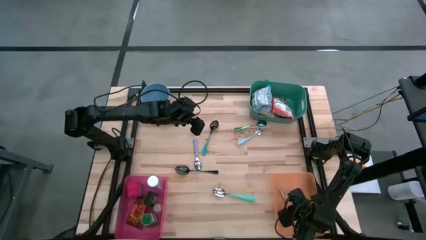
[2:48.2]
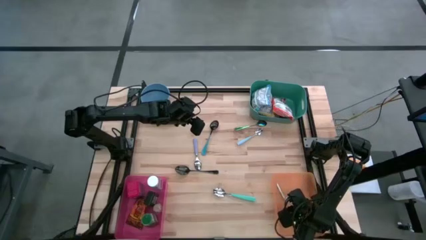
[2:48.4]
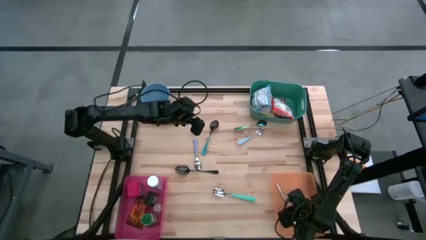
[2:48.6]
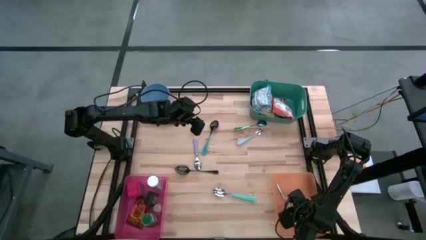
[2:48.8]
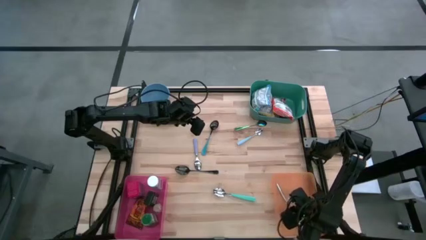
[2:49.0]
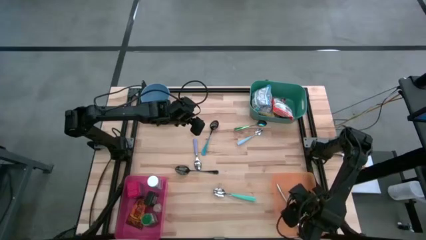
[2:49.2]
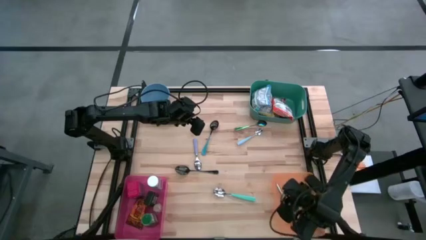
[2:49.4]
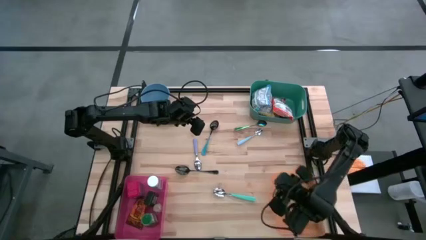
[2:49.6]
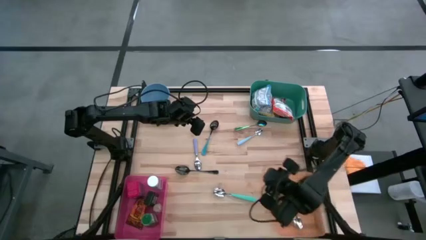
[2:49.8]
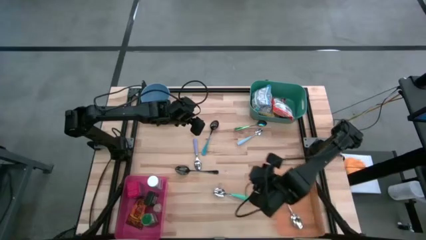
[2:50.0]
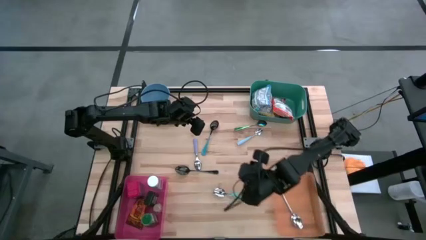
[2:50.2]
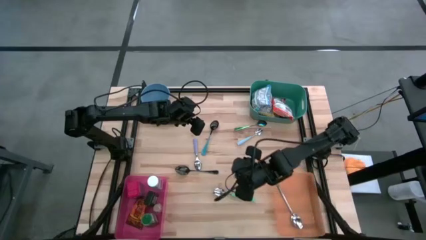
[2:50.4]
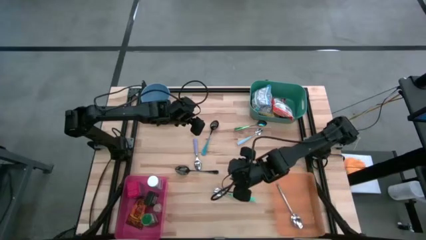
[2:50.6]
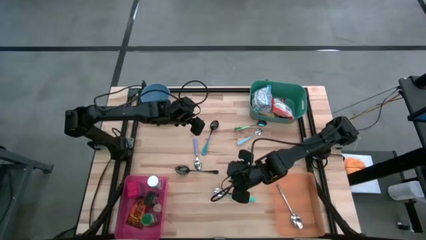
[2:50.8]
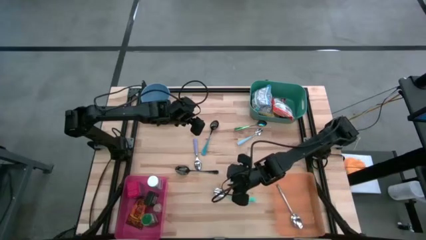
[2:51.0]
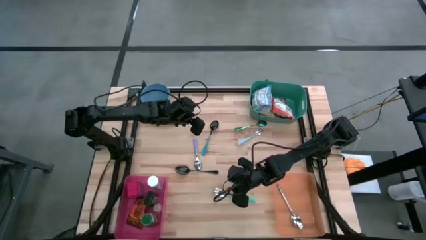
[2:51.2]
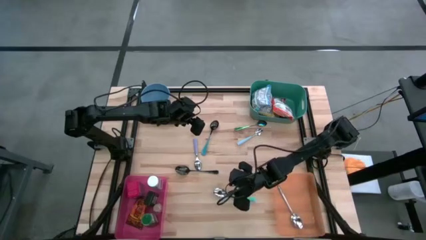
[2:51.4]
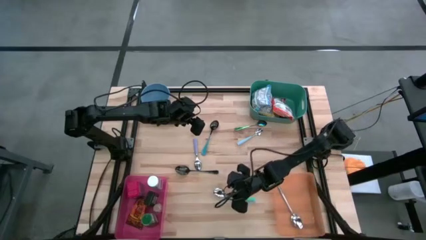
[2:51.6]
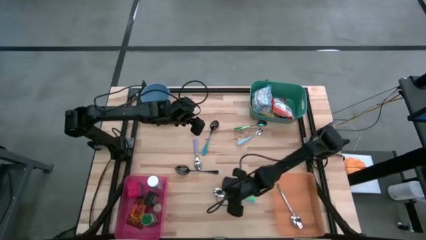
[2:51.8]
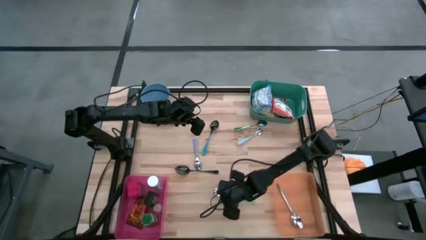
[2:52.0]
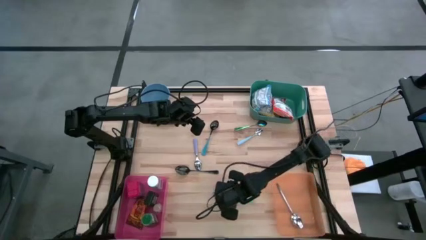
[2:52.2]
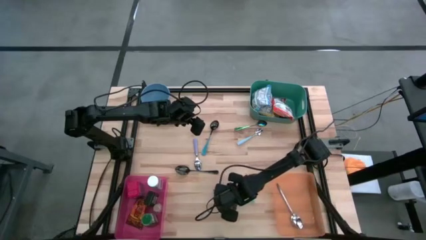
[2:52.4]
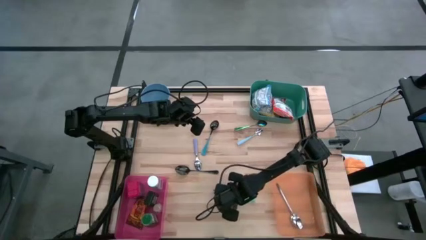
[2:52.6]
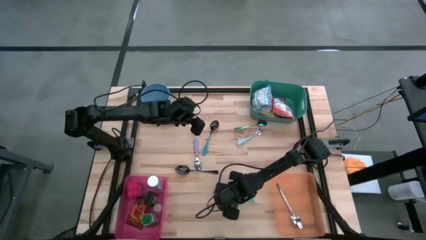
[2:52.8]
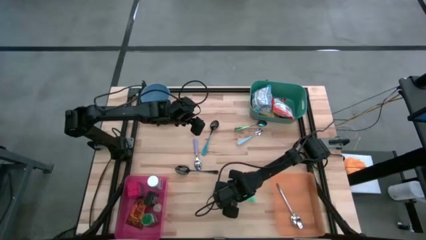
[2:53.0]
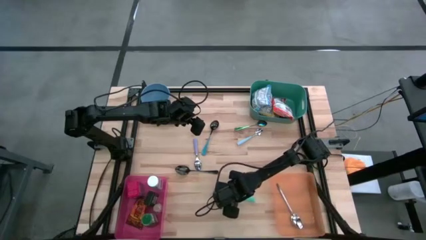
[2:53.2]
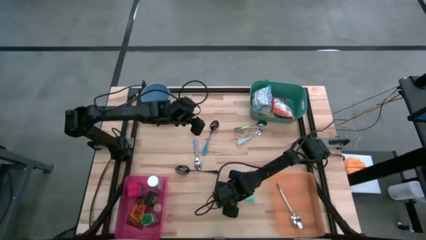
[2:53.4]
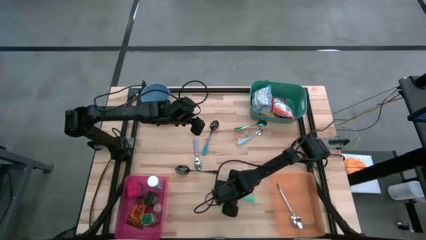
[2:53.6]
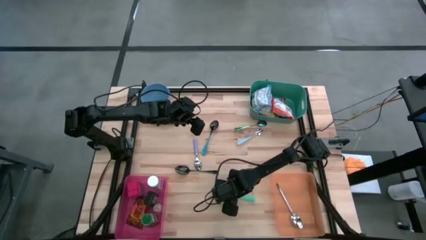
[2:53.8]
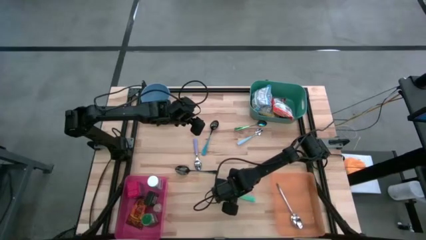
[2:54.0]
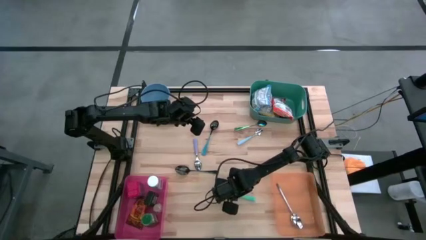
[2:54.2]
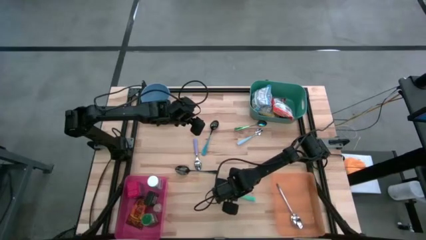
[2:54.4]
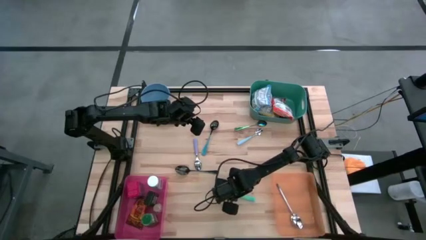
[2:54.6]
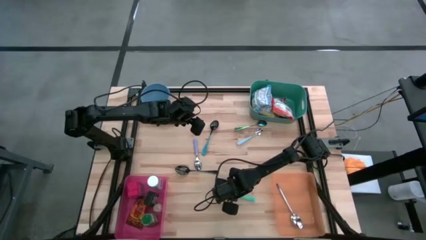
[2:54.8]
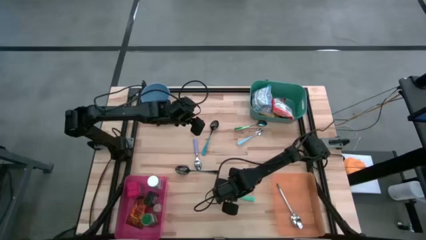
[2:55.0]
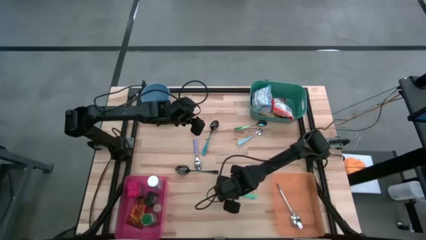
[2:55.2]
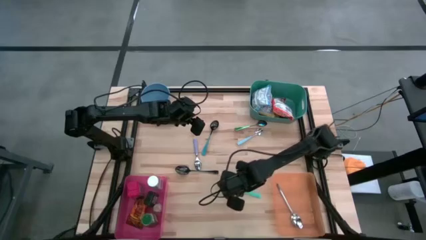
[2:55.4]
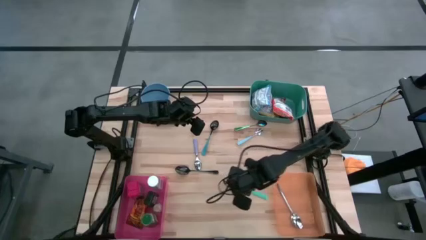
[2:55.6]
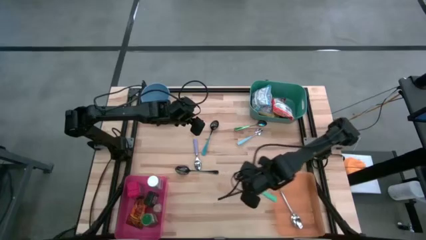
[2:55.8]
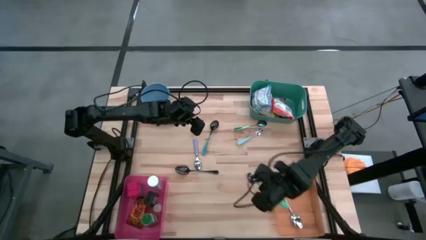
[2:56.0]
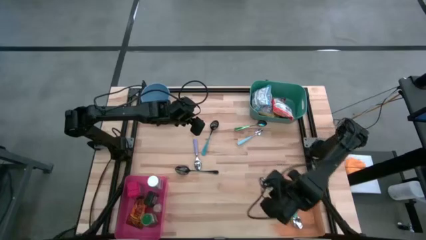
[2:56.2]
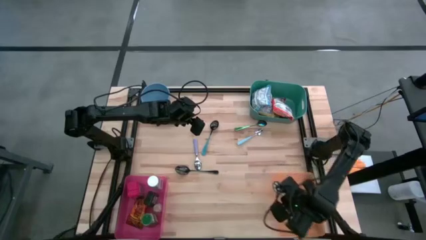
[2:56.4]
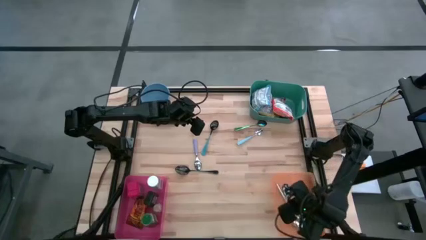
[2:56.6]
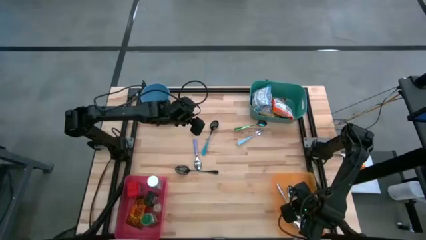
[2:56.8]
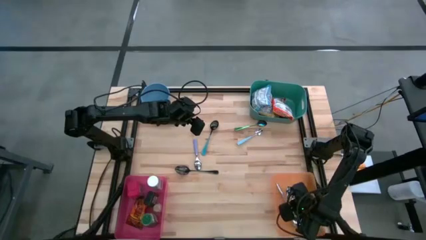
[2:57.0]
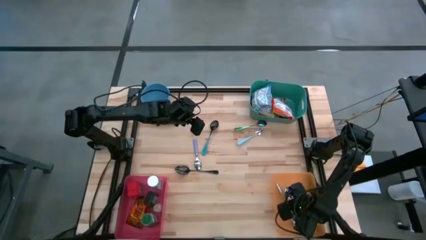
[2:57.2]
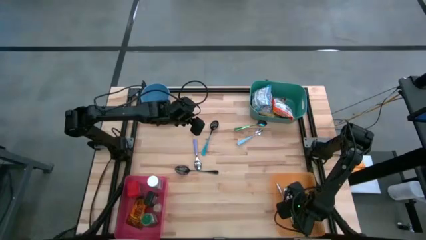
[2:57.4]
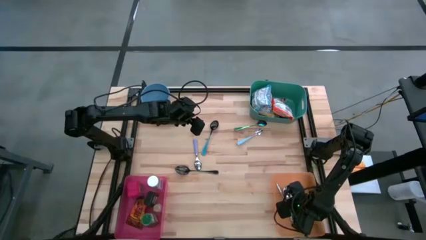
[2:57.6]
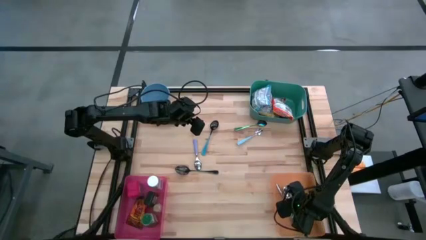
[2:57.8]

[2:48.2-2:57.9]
Put the light green spoon into the orange bin

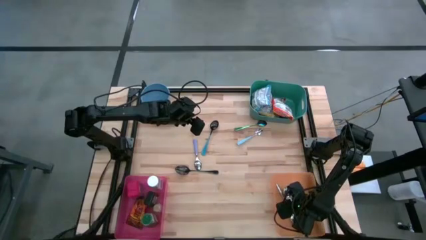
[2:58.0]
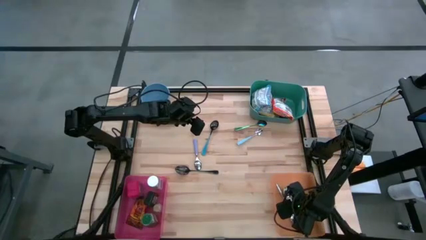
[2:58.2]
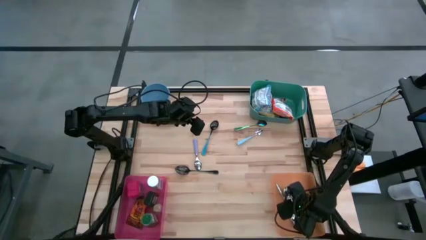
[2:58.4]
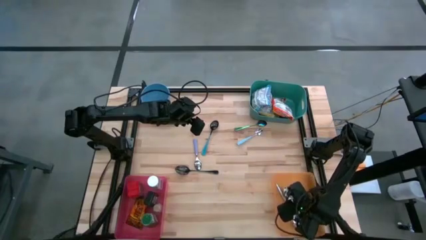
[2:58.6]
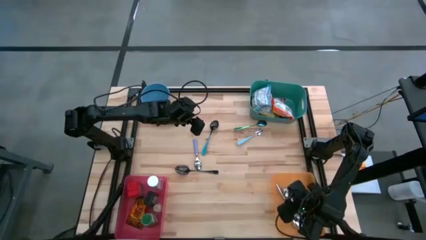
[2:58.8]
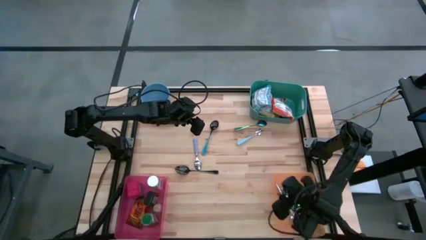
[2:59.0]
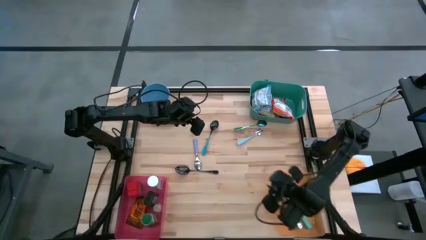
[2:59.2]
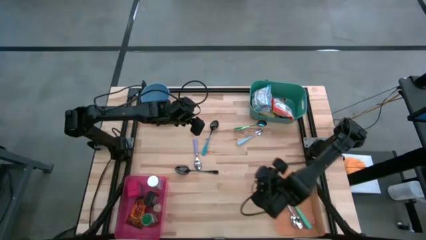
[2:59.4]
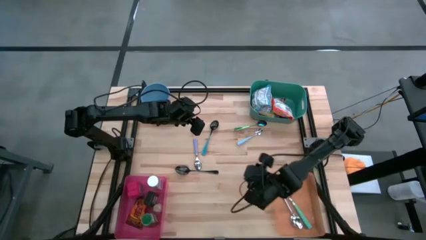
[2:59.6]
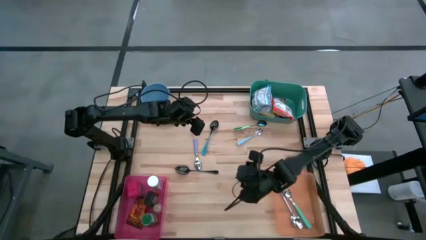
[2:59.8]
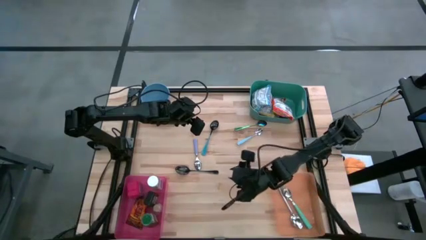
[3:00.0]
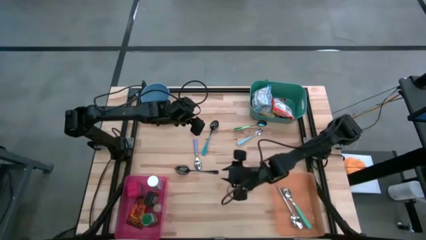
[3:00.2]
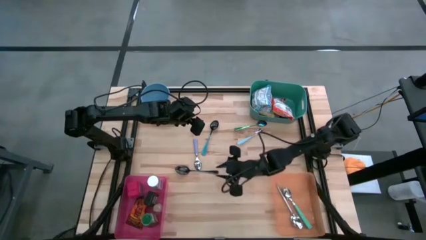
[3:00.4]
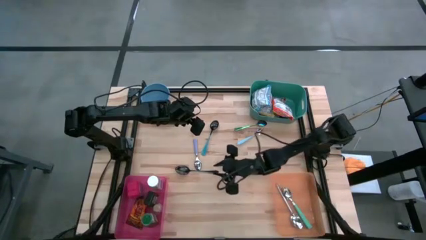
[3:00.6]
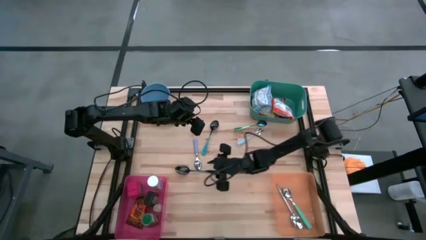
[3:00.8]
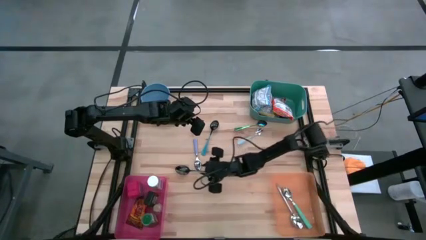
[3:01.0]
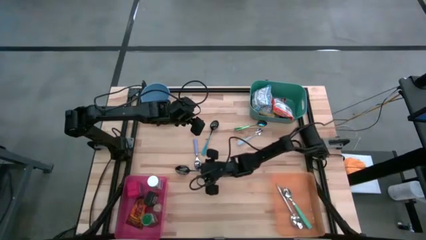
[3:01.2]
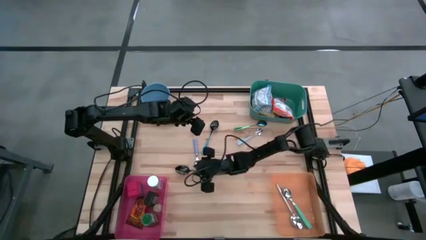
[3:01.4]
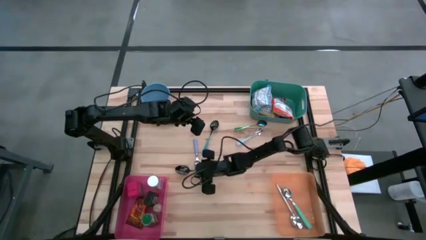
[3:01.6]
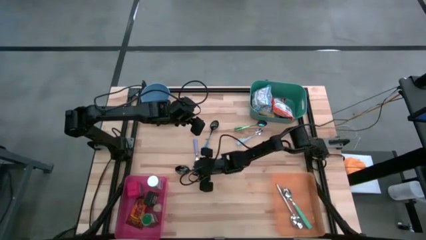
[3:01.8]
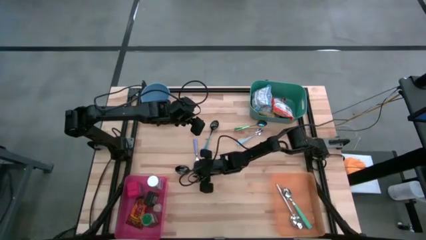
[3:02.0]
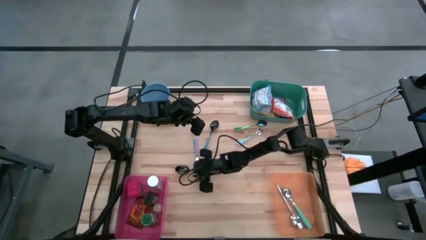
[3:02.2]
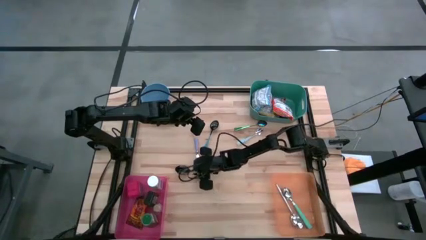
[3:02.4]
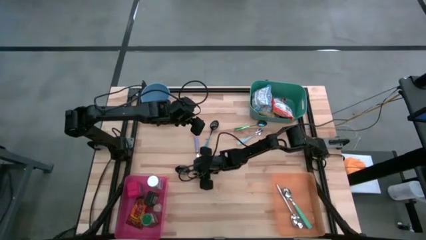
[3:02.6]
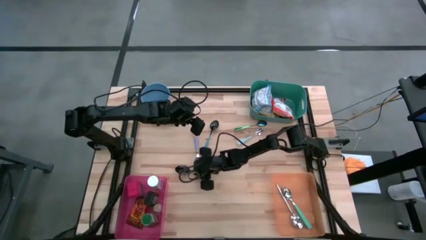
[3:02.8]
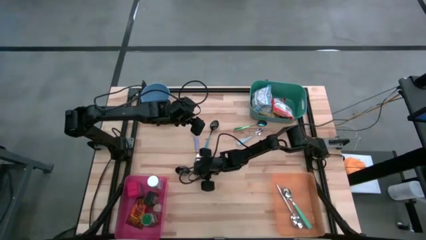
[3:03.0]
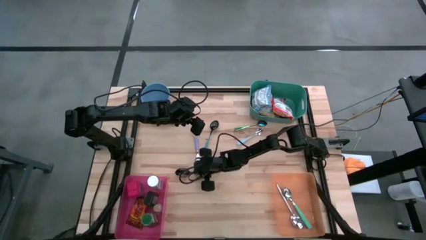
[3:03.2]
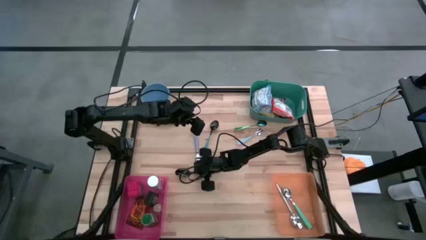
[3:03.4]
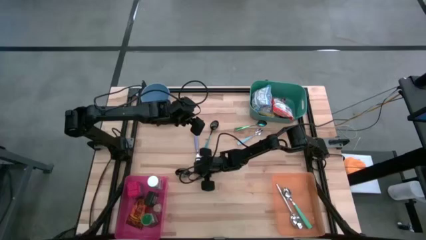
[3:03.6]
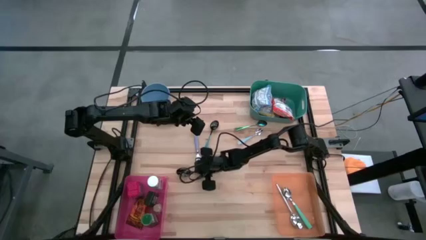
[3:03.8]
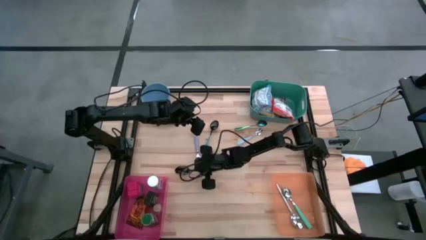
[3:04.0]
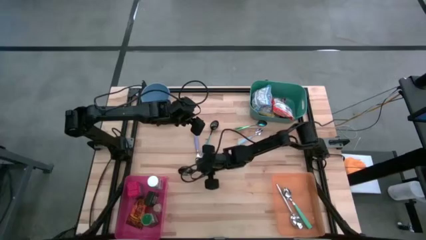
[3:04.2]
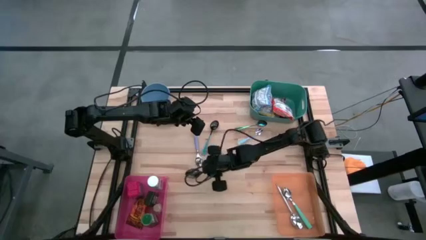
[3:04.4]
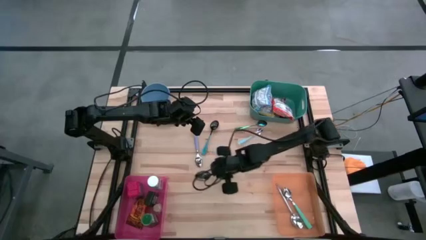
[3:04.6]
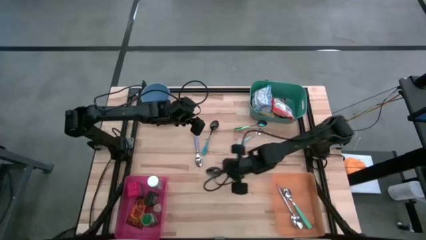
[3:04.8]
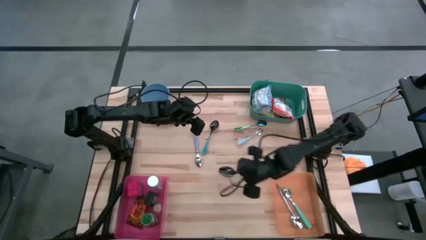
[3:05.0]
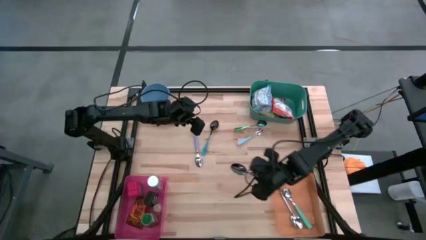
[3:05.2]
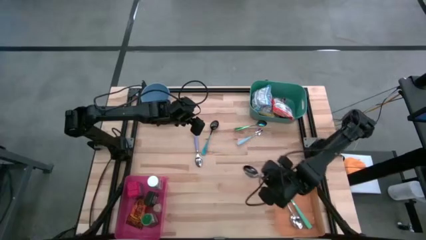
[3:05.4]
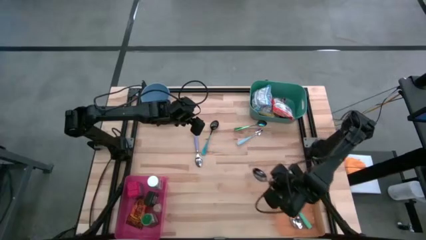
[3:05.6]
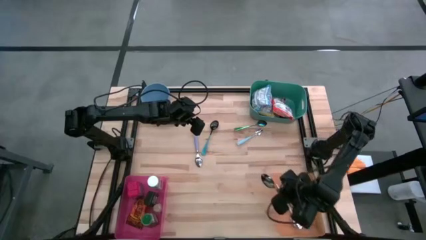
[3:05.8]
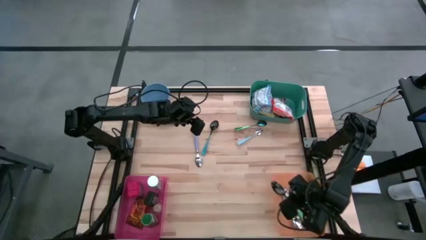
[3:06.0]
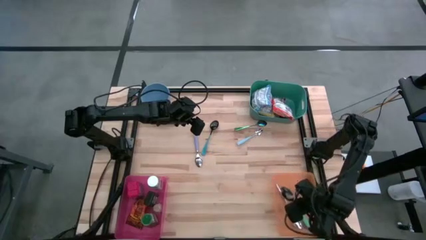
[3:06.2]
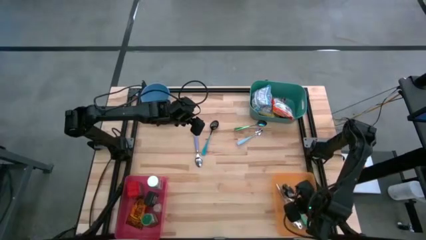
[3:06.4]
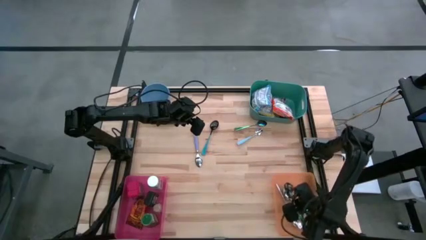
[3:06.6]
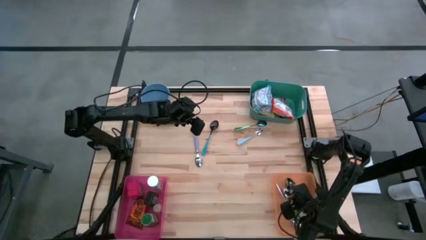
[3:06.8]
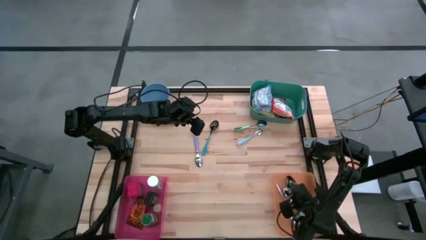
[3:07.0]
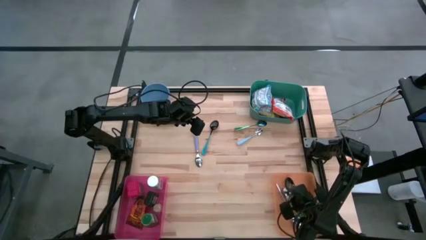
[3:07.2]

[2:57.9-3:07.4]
Put the black spoon into the orange bin
